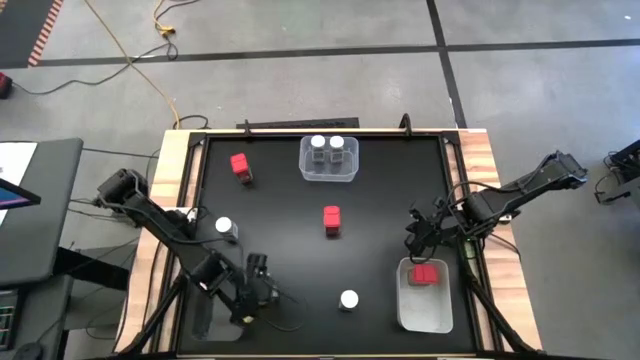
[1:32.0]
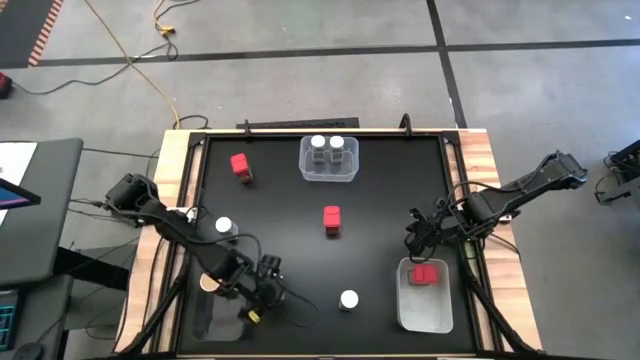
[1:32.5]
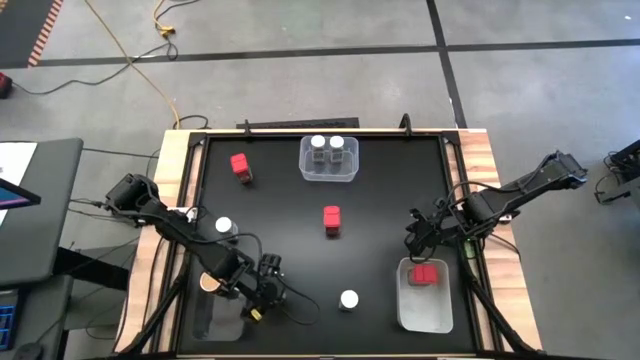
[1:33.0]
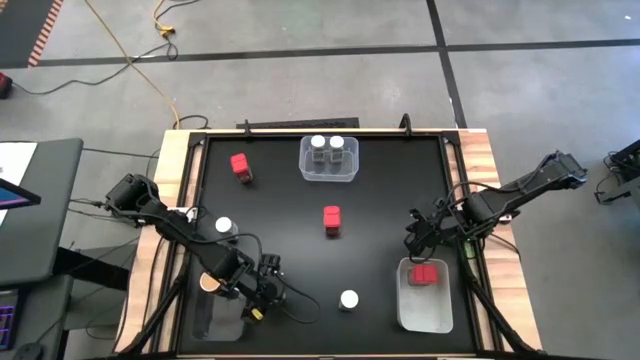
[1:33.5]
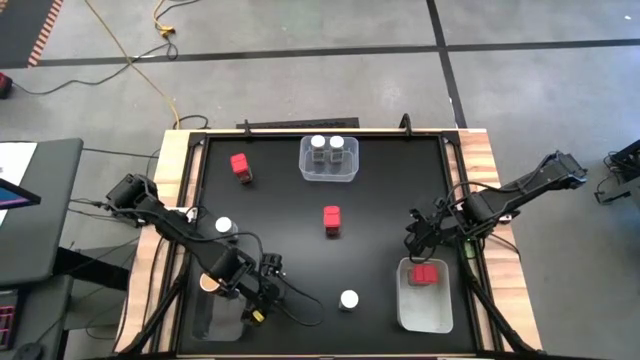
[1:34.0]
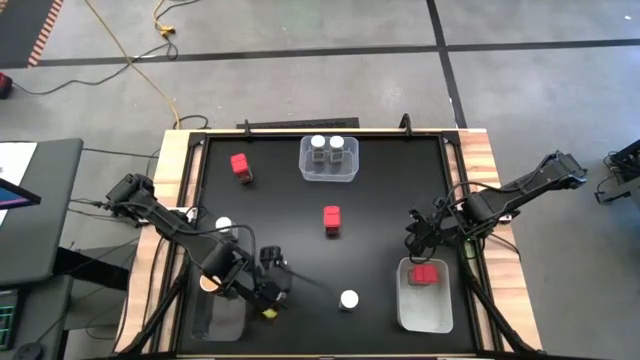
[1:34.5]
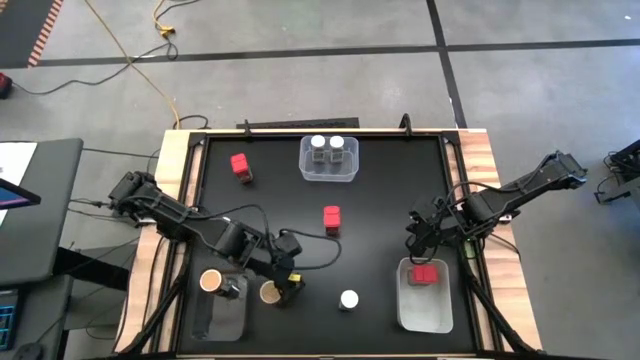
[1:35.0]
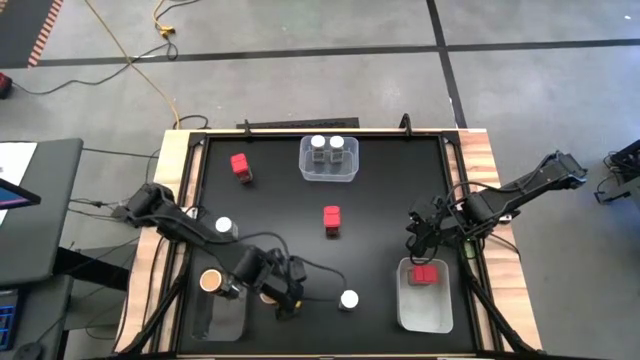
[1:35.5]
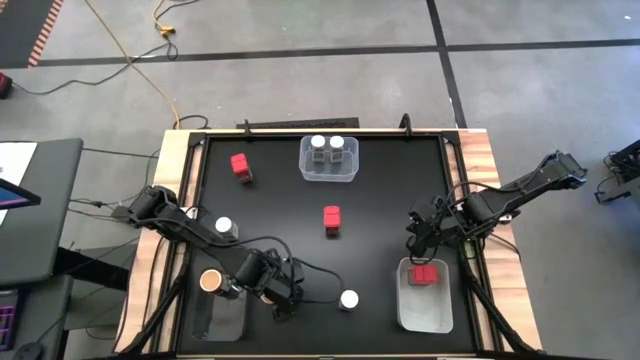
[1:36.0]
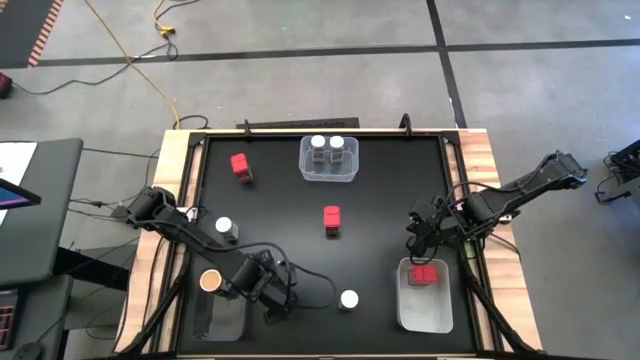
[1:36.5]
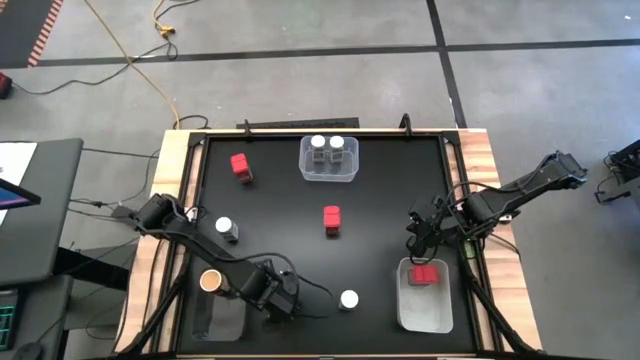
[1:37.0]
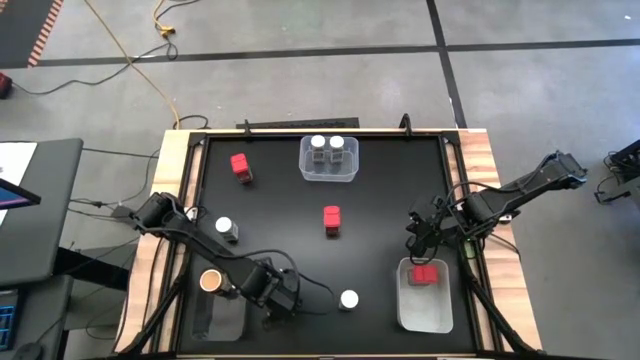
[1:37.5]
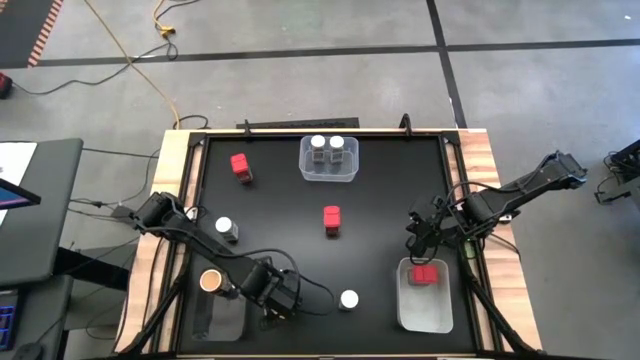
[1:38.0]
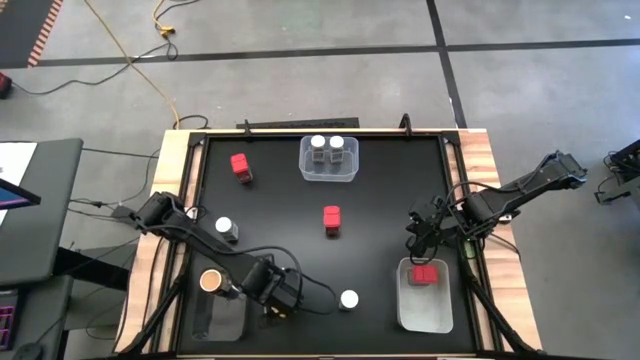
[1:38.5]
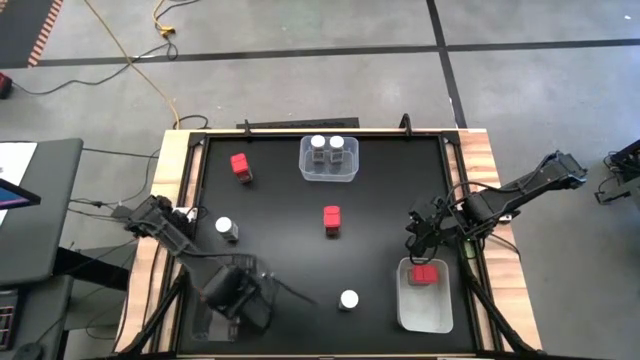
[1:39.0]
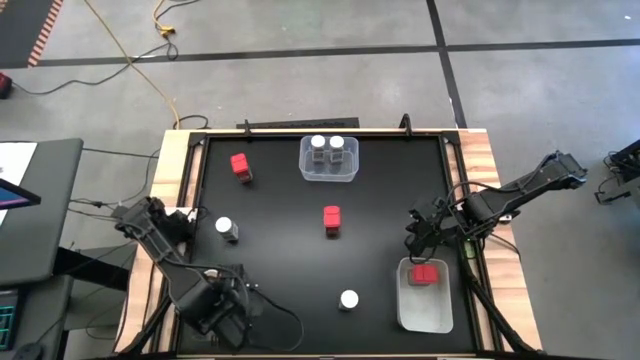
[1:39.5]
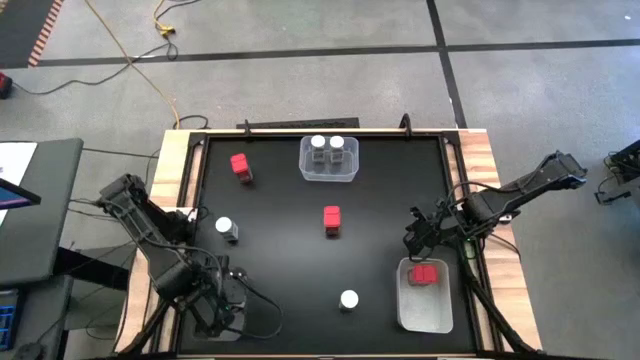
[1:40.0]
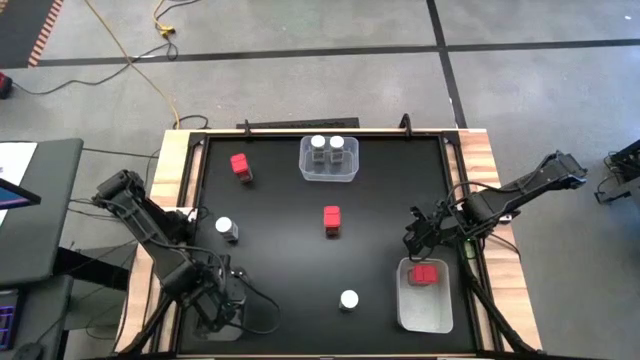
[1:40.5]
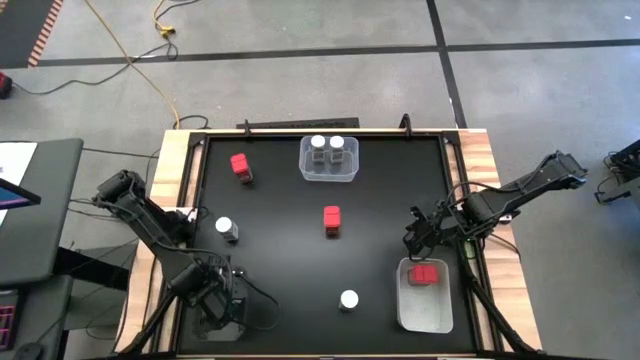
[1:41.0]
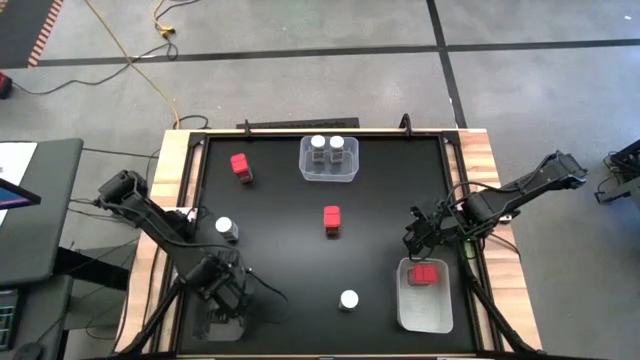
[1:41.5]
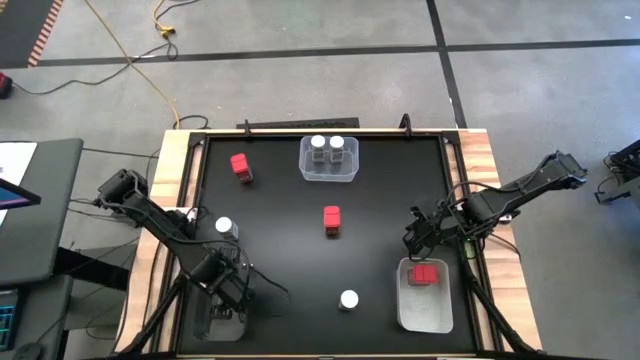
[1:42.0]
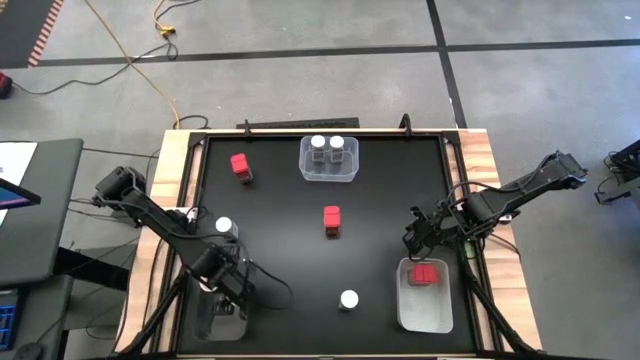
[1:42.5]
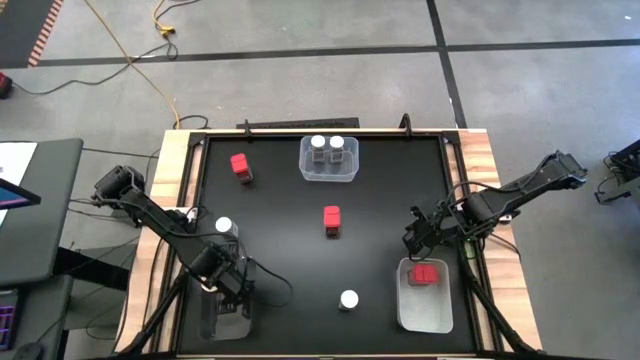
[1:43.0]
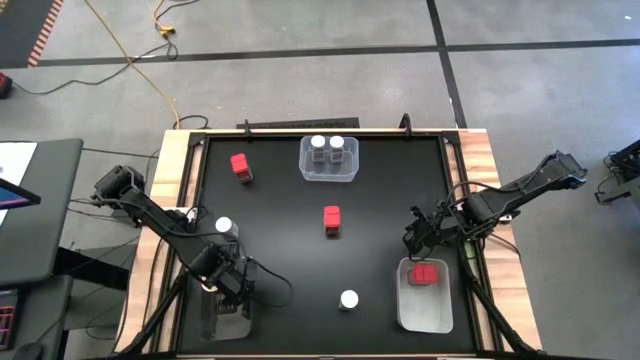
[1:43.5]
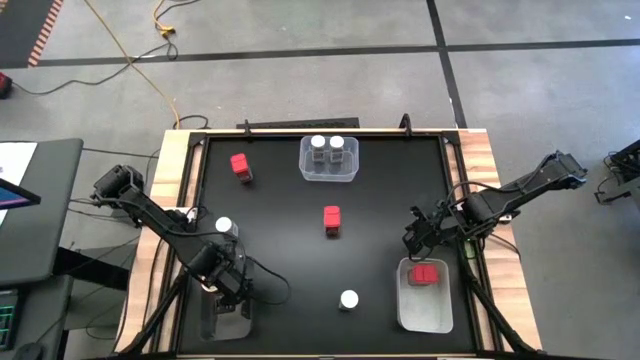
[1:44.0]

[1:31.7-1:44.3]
Task: Sort spices by type
Put the brown spice bottle into the black bin

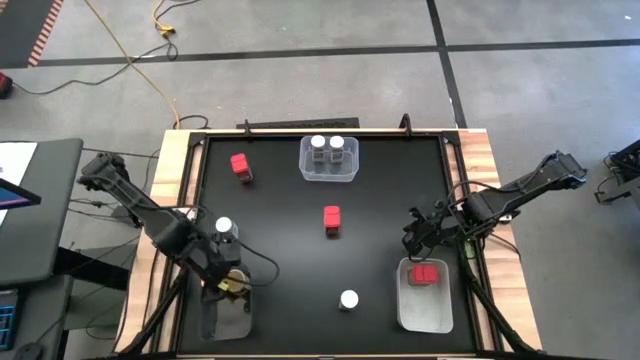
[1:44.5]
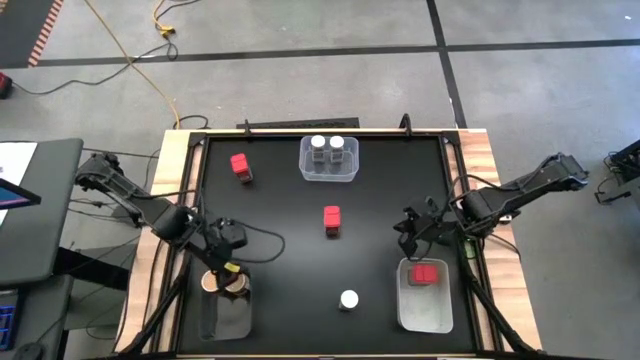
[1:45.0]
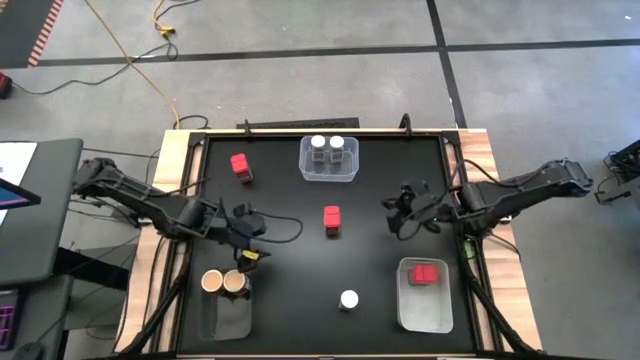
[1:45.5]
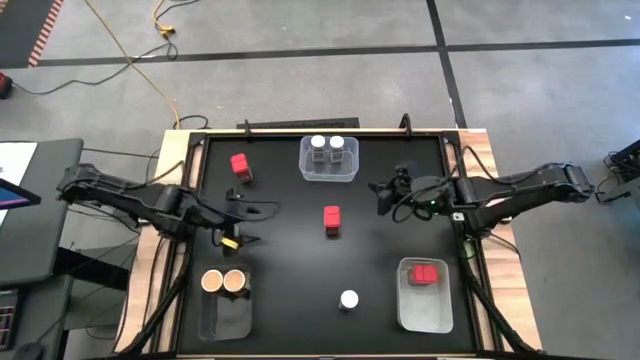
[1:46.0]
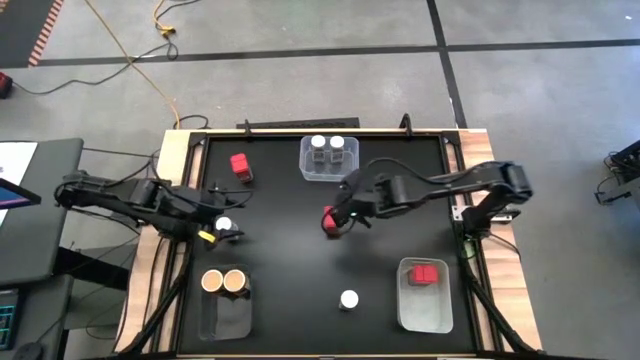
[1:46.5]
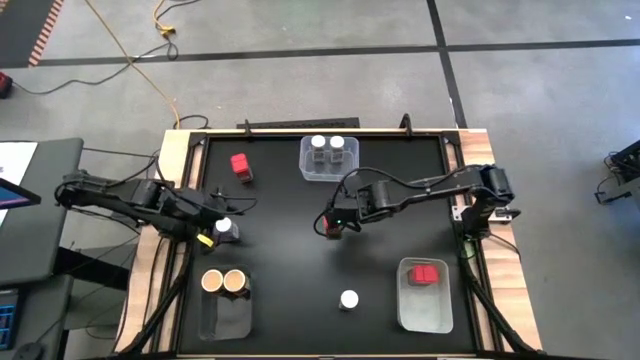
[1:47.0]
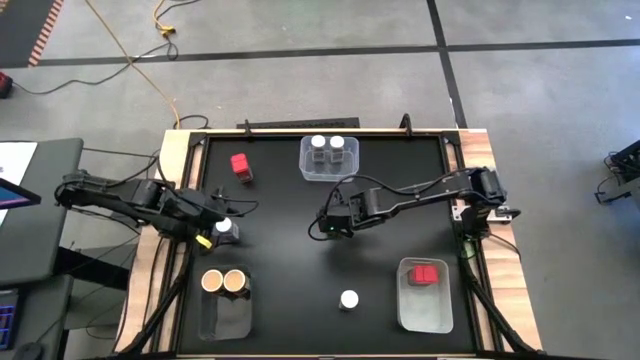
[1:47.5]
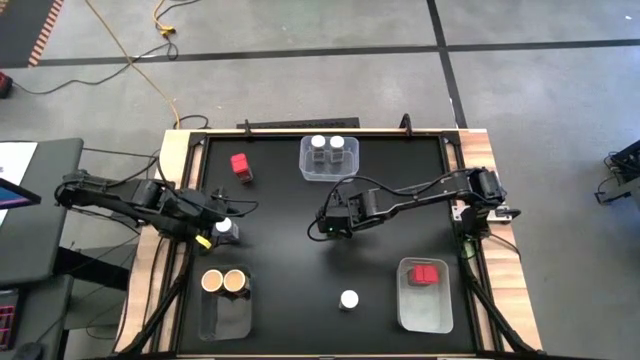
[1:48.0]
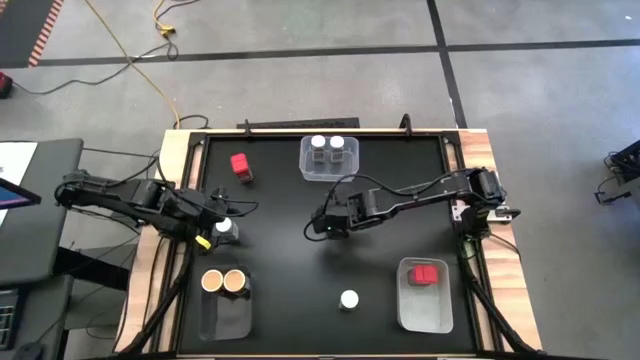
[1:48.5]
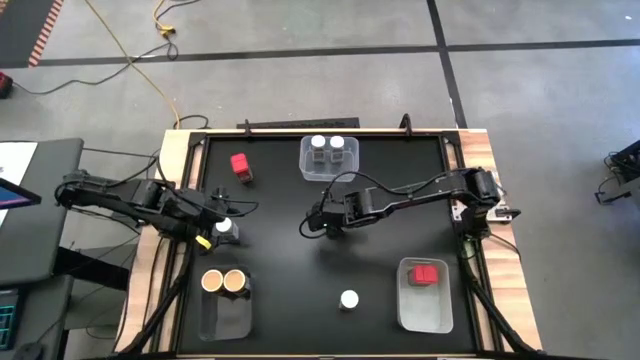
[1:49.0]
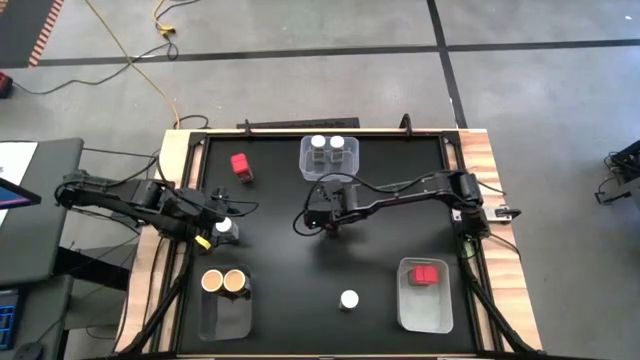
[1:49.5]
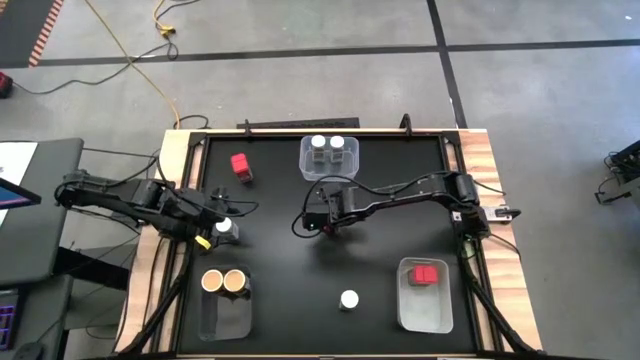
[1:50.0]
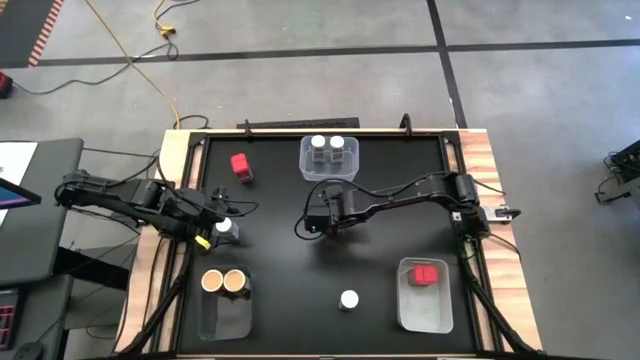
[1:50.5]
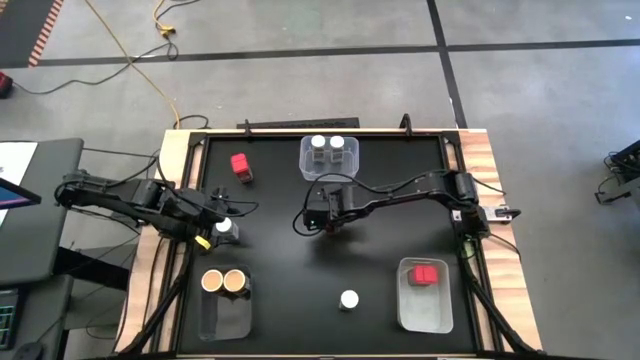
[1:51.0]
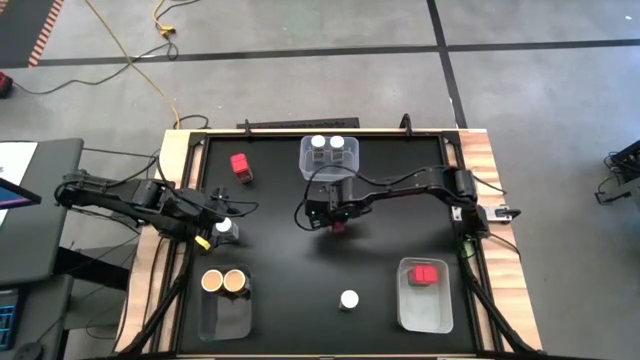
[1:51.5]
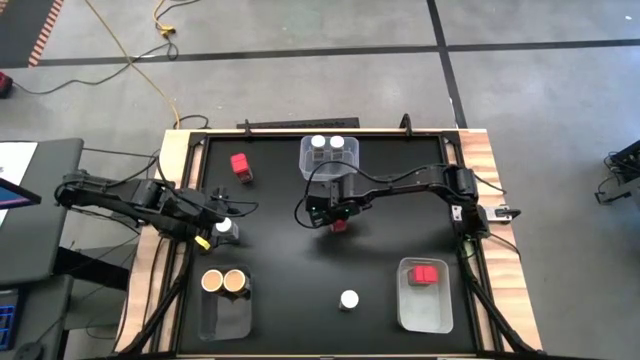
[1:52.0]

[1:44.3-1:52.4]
Put the right red spice can into the white bin
